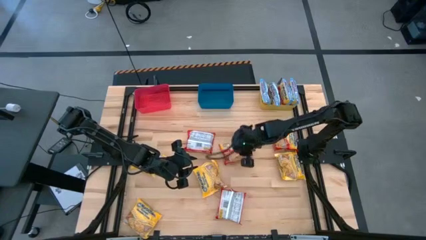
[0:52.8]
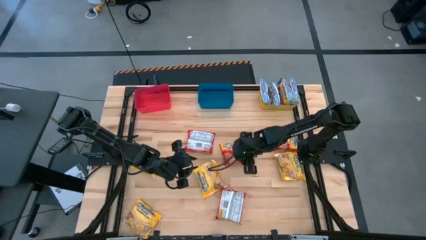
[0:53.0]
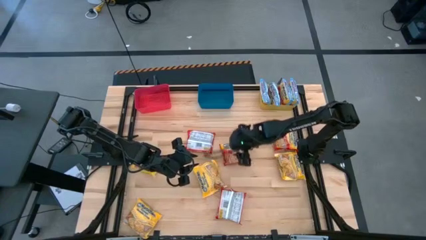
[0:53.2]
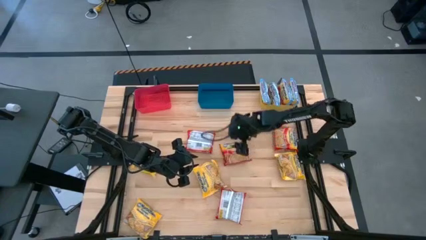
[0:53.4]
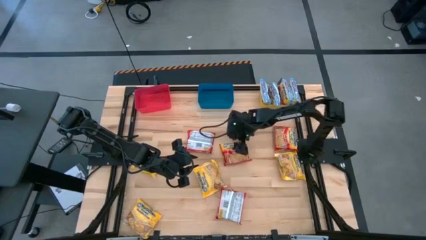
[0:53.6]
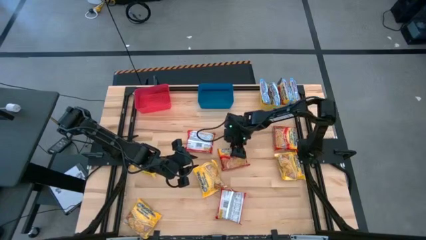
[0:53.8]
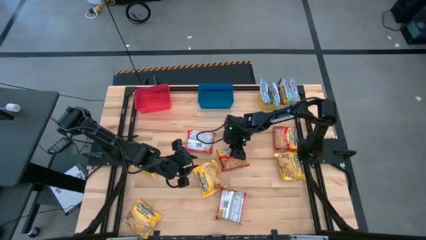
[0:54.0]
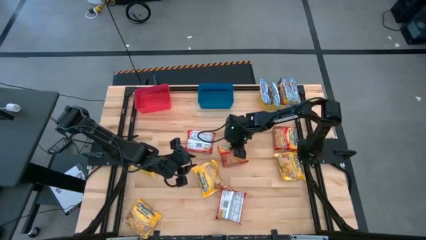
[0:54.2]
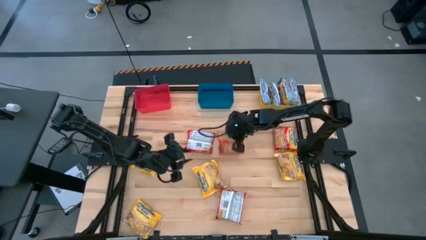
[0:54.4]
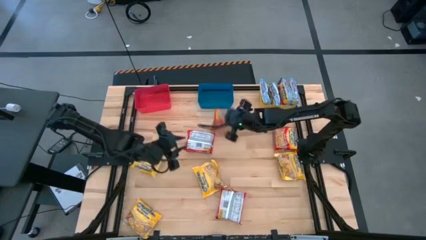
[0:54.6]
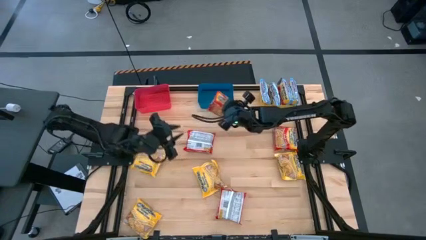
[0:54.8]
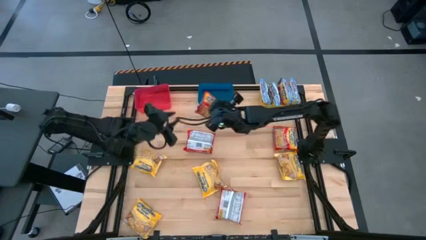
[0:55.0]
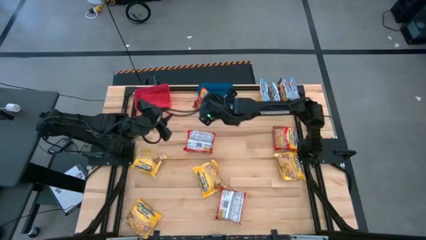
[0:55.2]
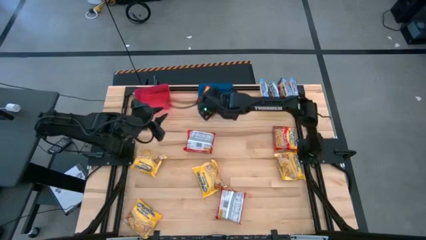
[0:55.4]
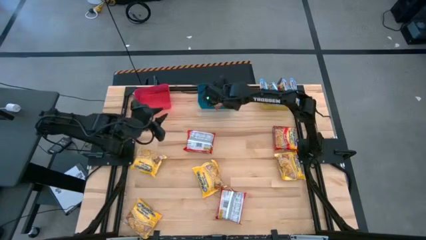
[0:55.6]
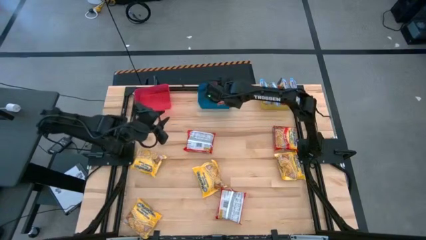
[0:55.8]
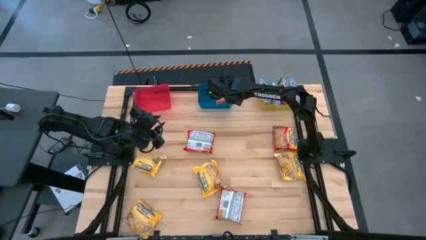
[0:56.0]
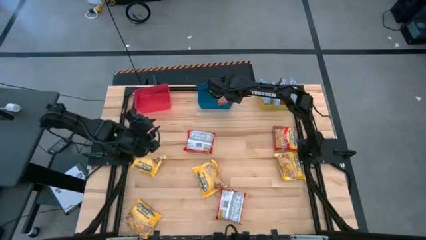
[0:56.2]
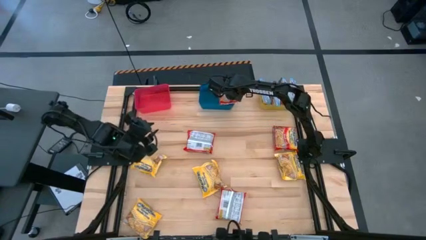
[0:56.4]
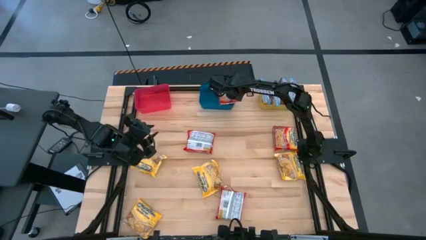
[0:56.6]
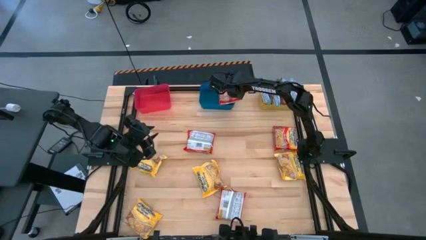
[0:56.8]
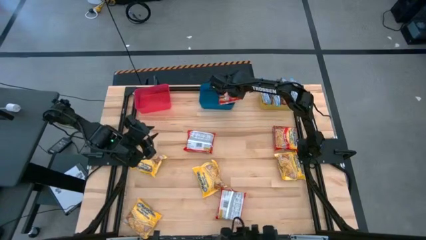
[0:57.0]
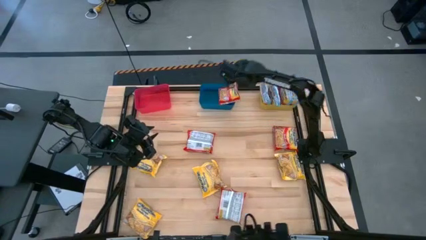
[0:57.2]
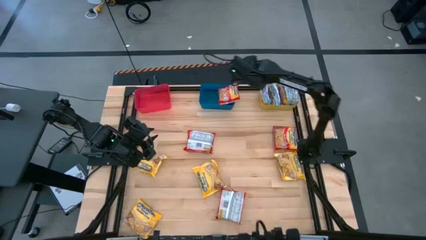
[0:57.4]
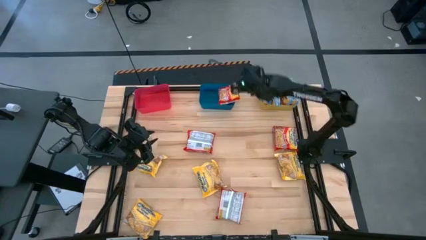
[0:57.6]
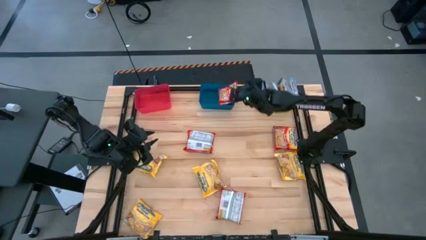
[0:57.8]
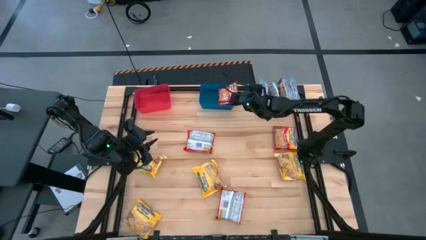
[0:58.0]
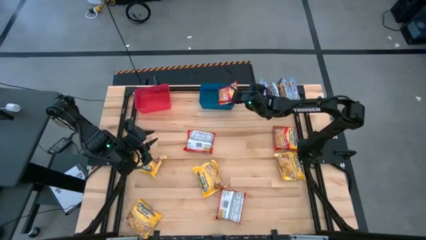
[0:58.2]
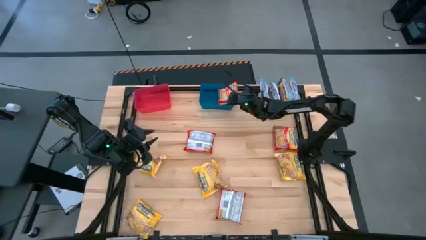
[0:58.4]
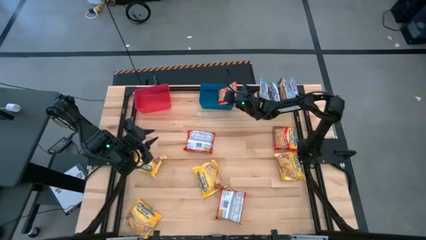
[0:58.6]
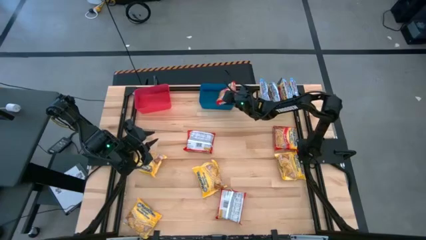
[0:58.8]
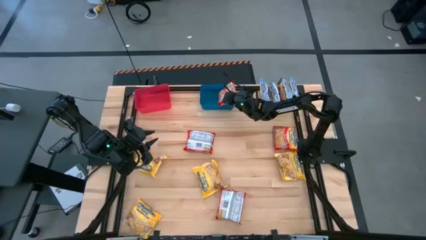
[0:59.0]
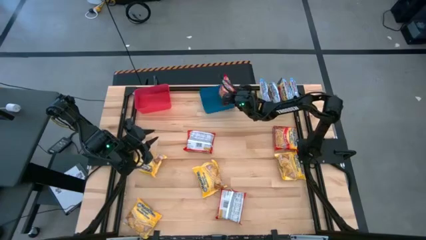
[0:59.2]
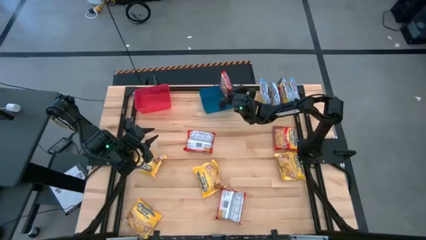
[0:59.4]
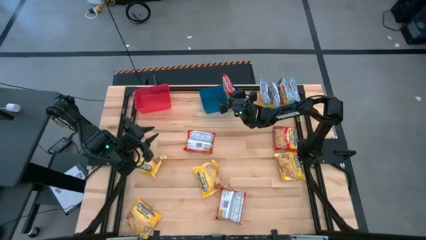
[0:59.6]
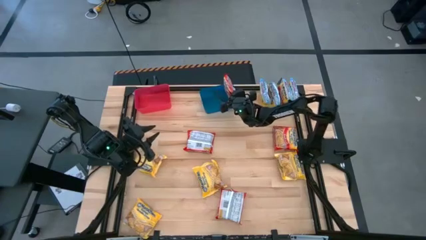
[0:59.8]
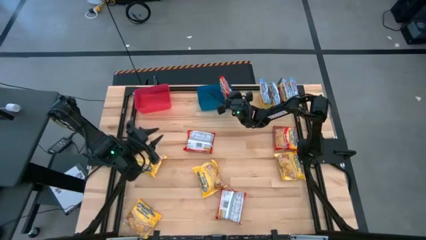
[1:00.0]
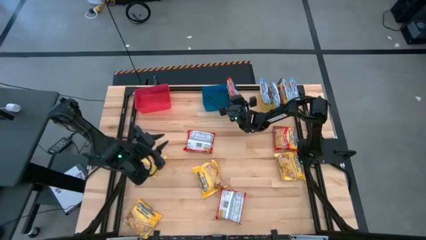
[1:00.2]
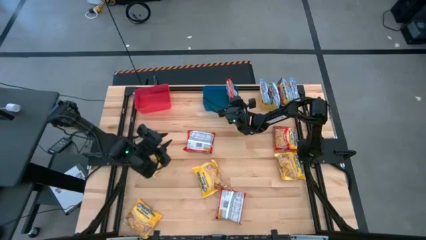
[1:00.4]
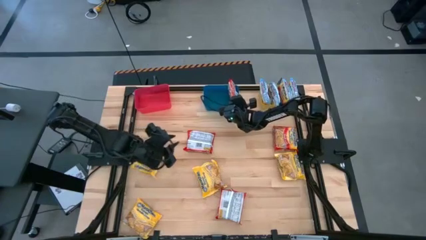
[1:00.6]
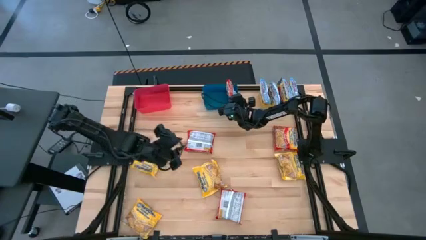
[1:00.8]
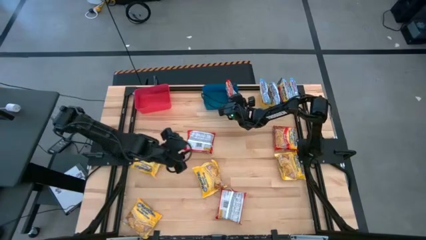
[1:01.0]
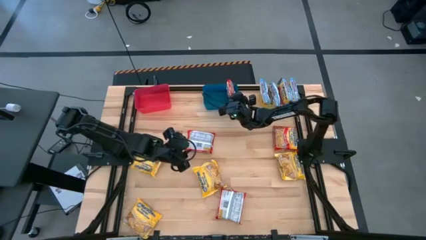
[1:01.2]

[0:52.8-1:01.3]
Task: Sort Maruchan noodles
Put the red noodle pack into the blue bin

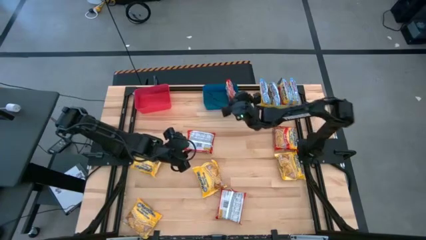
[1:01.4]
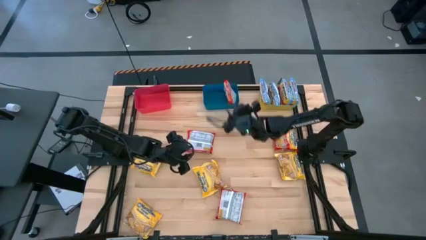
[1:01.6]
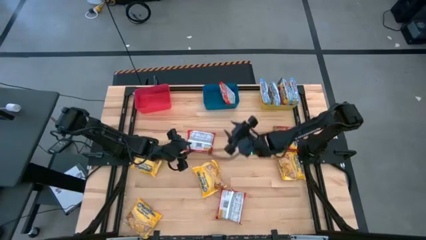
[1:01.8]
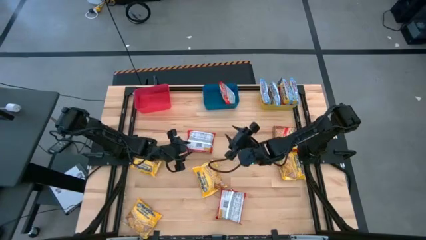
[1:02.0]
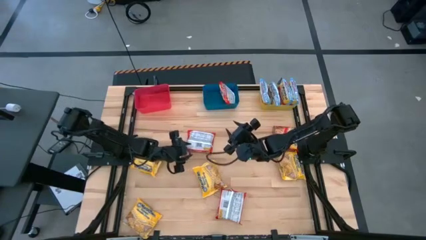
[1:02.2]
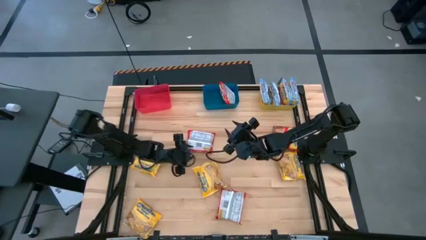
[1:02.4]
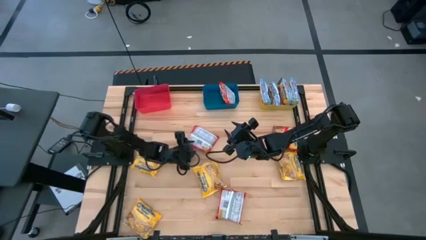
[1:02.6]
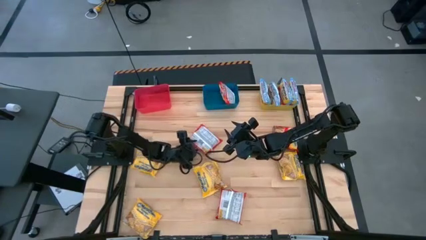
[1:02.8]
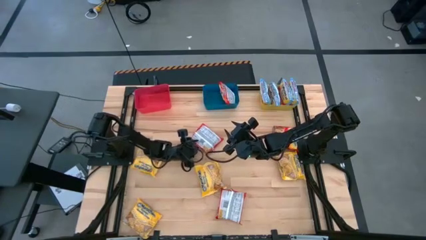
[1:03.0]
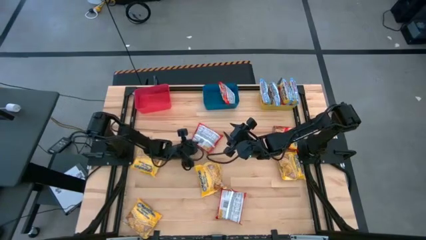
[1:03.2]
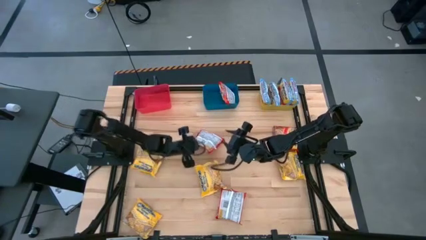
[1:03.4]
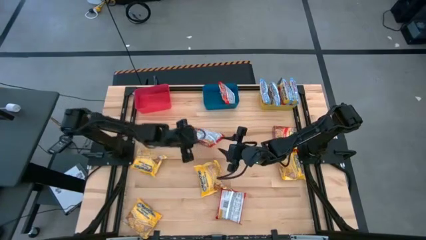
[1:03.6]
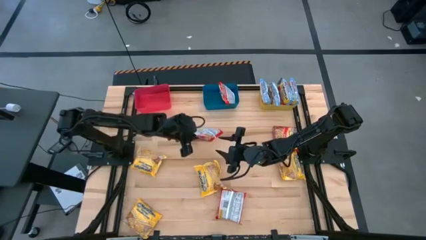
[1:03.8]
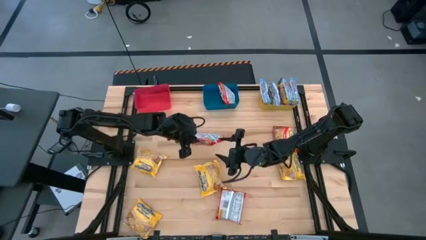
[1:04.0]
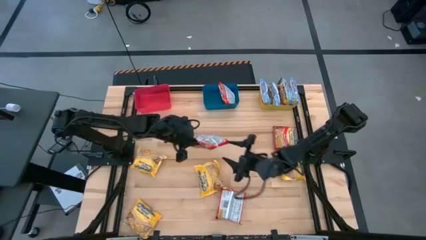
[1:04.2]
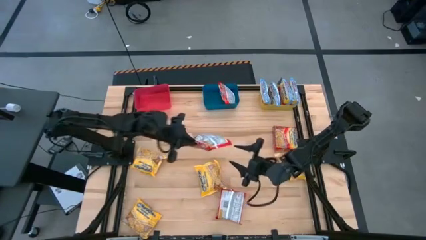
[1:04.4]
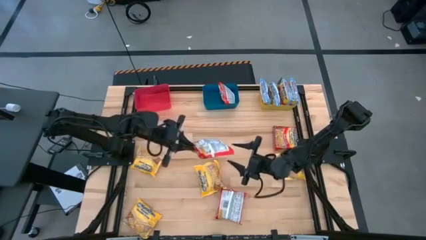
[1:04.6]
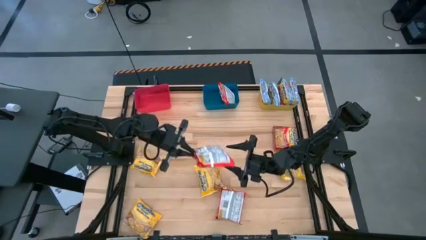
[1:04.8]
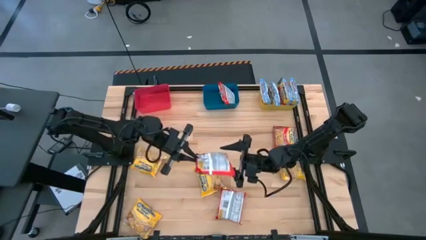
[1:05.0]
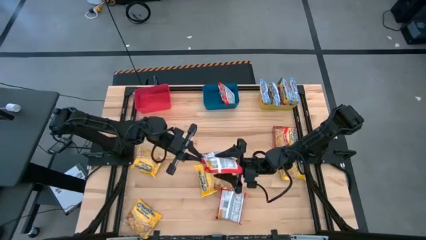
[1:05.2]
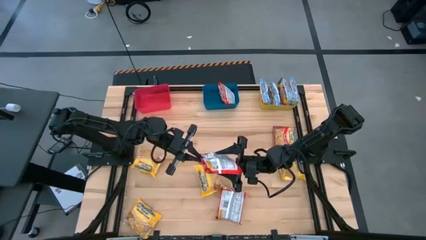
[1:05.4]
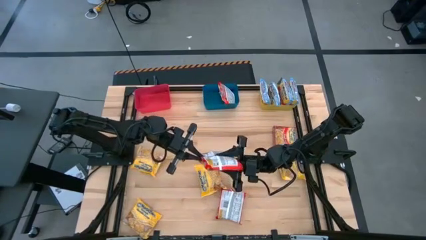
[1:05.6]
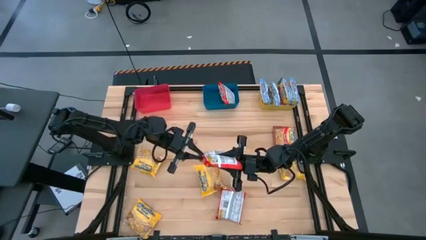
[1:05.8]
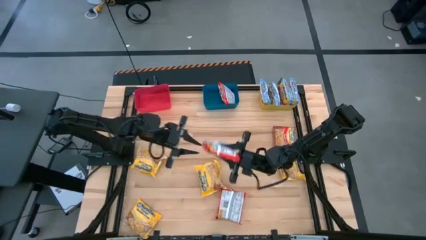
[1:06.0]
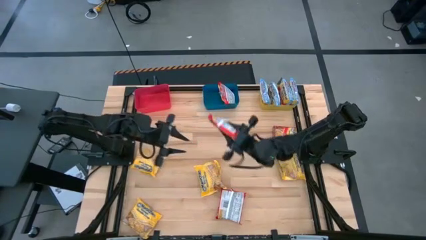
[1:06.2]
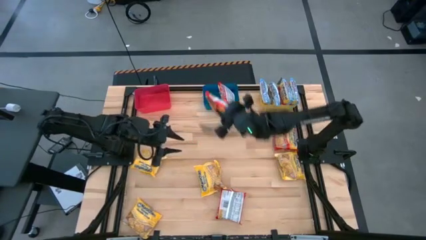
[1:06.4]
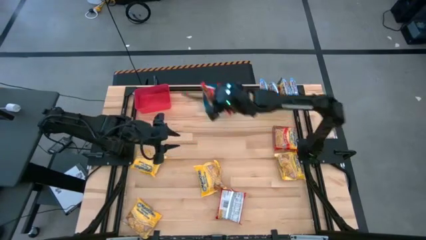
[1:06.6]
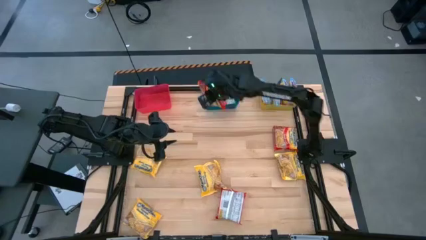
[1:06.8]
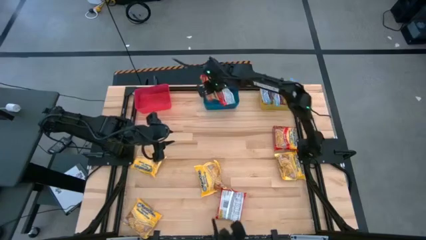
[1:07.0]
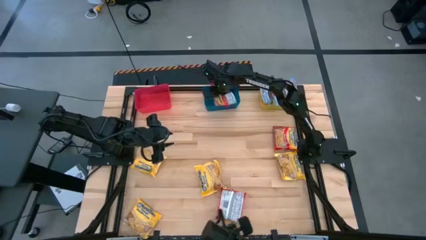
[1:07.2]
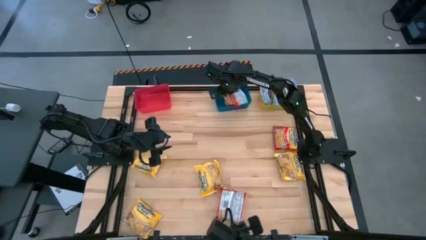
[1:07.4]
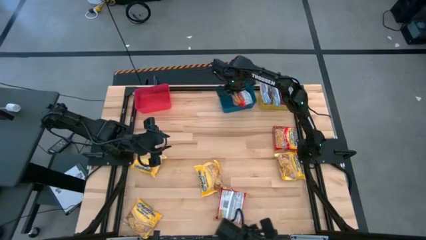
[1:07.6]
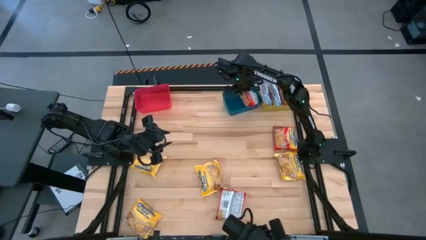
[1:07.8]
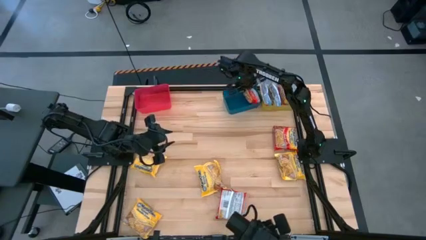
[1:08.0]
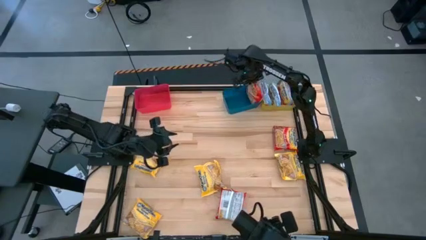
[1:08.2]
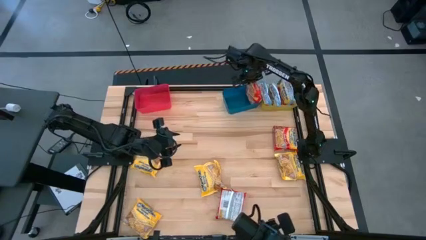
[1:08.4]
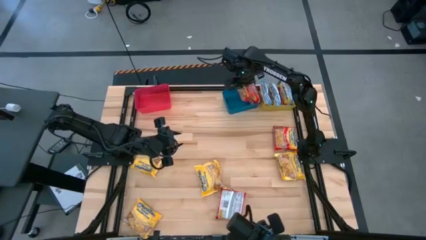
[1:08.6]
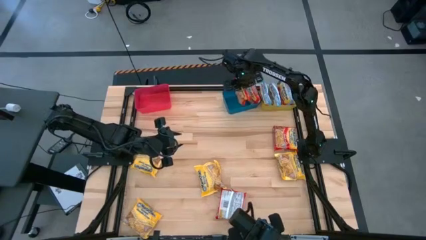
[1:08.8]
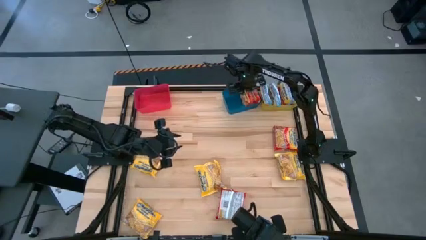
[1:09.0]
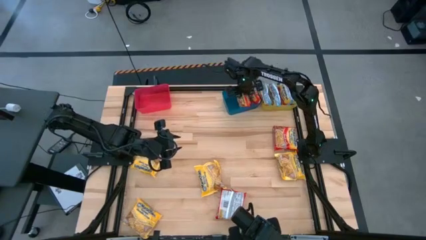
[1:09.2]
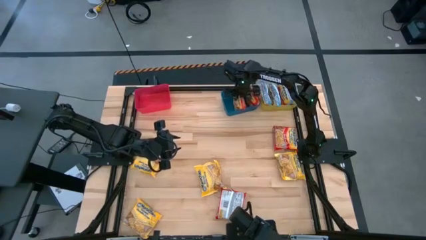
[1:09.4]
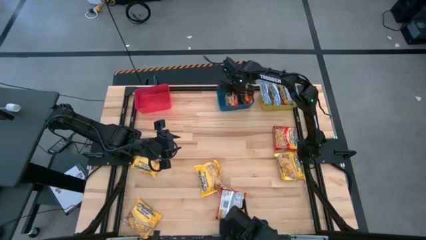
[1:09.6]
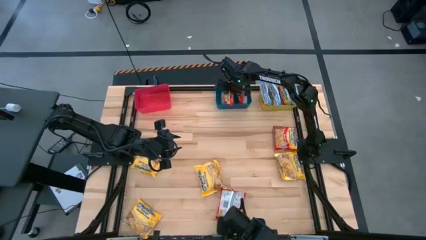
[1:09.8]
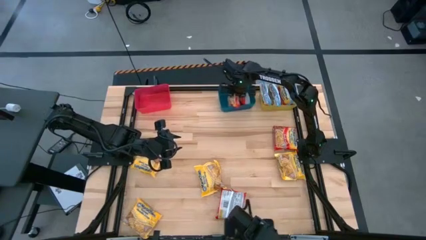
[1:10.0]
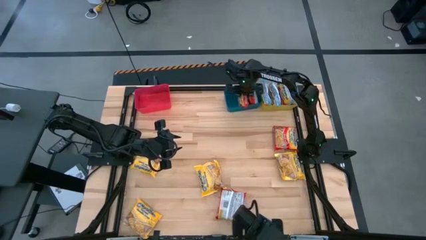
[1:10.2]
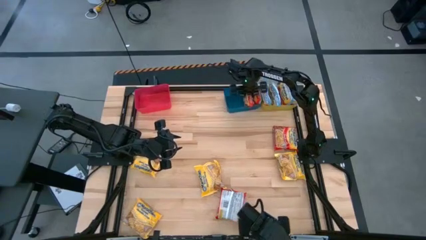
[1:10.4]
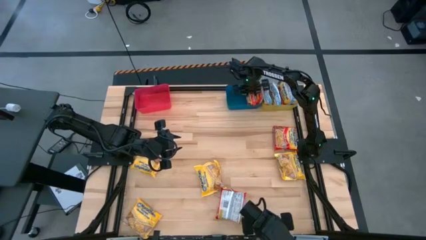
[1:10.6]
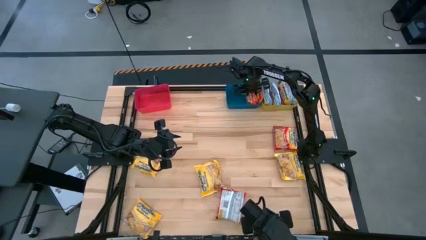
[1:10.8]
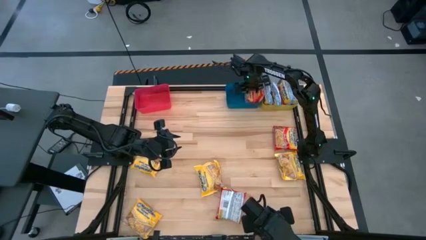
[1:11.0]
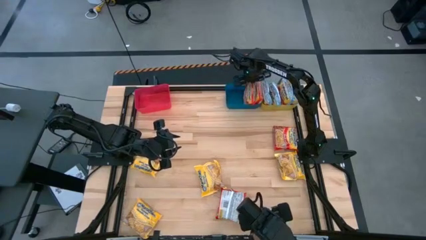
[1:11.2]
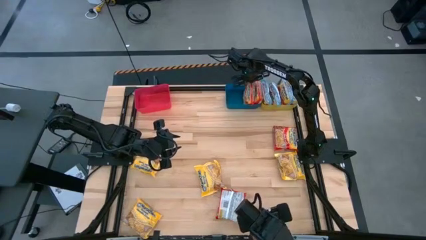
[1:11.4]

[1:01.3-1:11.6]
Put the red noodle pack into the blue bin
